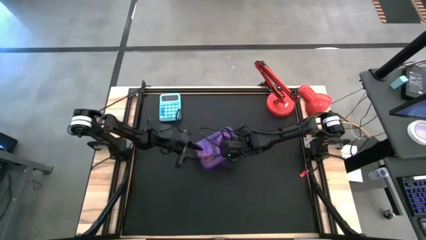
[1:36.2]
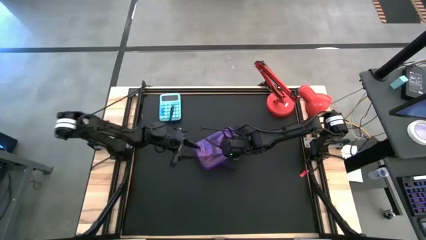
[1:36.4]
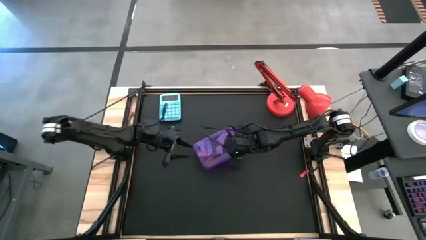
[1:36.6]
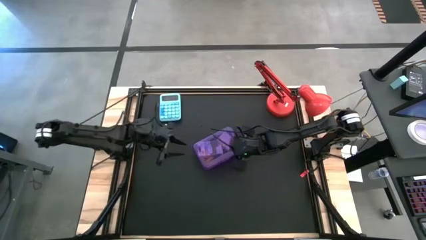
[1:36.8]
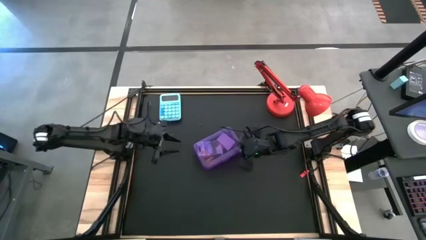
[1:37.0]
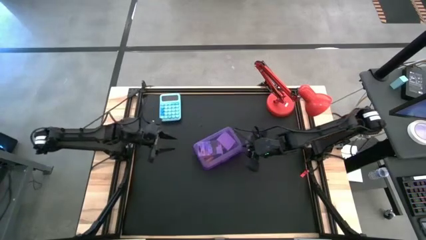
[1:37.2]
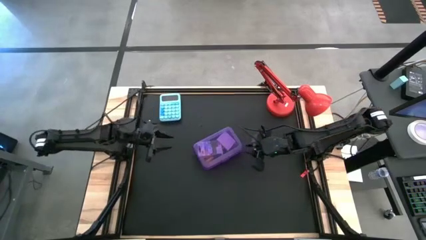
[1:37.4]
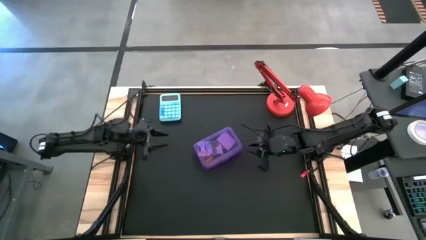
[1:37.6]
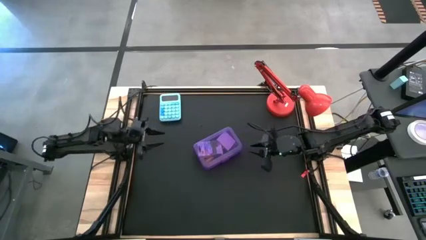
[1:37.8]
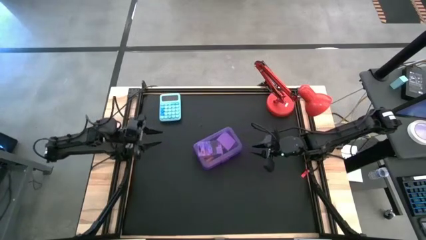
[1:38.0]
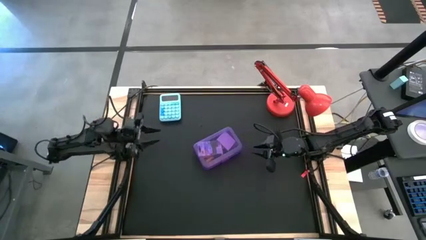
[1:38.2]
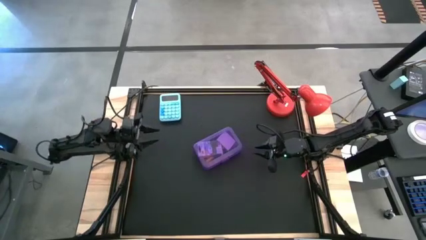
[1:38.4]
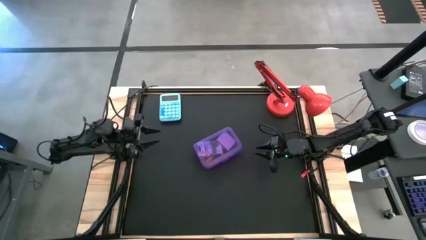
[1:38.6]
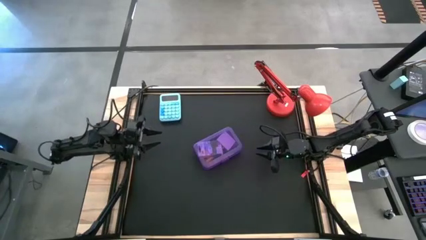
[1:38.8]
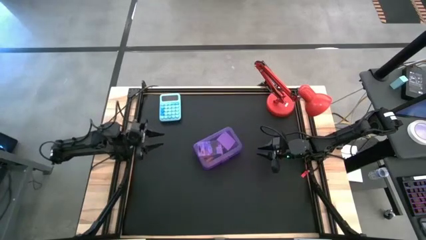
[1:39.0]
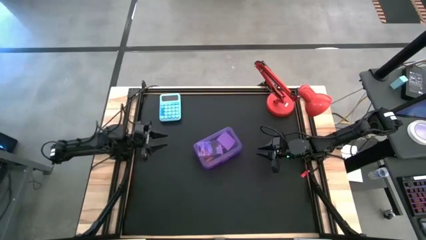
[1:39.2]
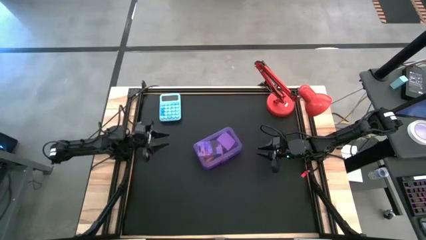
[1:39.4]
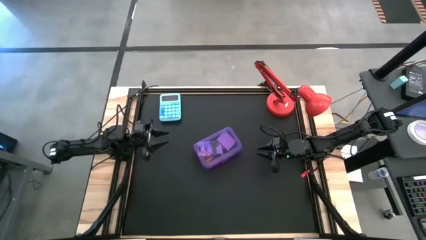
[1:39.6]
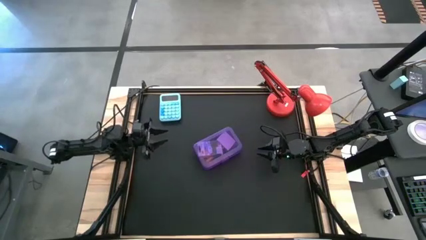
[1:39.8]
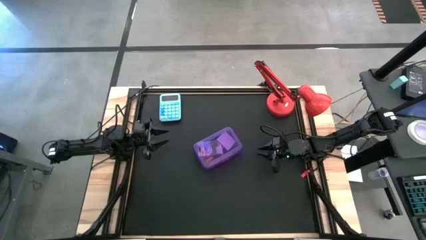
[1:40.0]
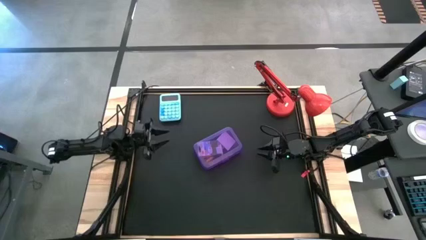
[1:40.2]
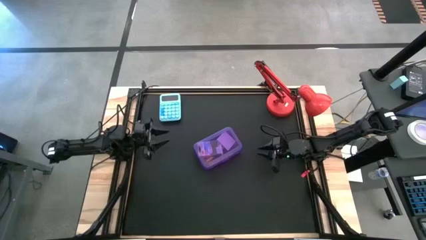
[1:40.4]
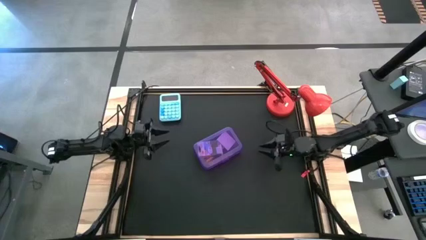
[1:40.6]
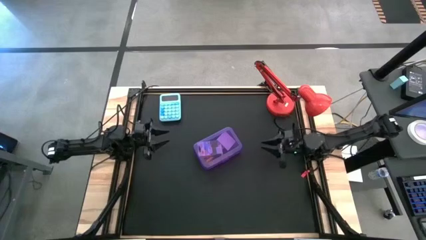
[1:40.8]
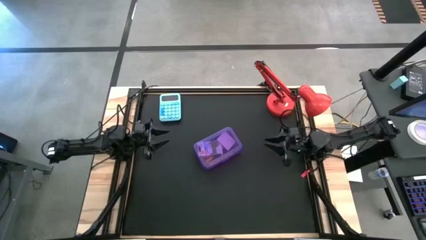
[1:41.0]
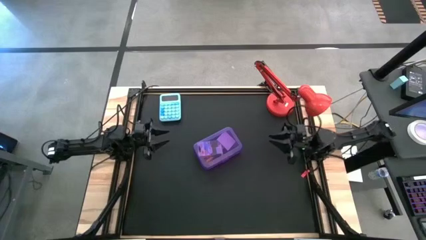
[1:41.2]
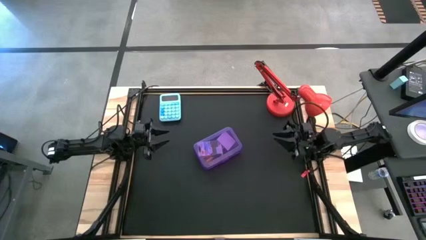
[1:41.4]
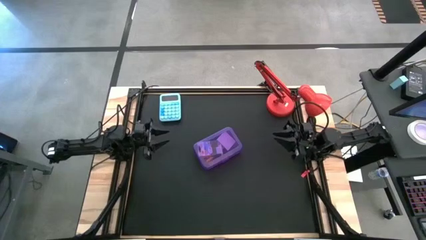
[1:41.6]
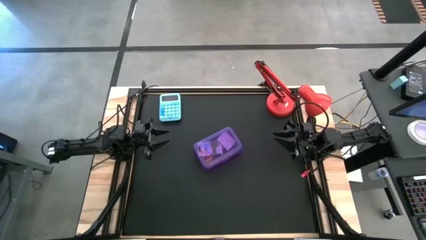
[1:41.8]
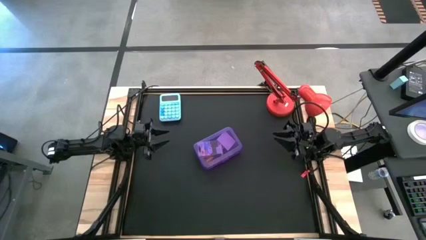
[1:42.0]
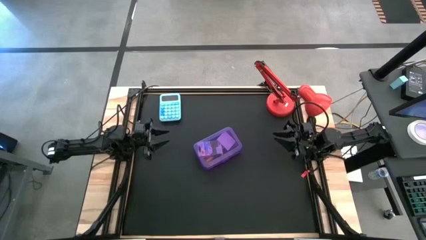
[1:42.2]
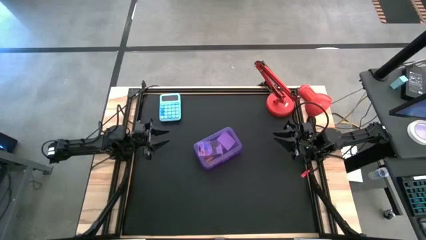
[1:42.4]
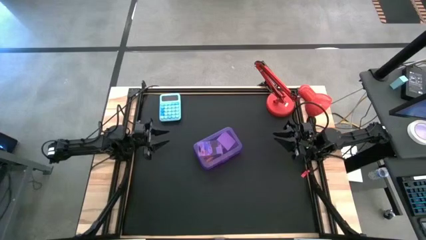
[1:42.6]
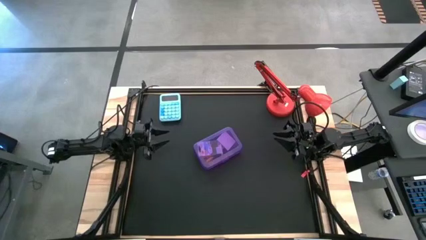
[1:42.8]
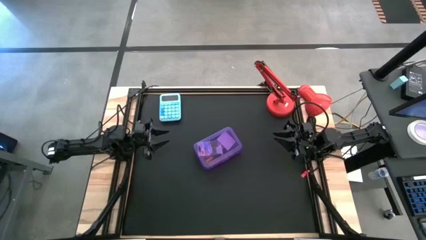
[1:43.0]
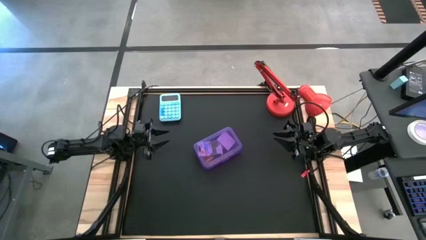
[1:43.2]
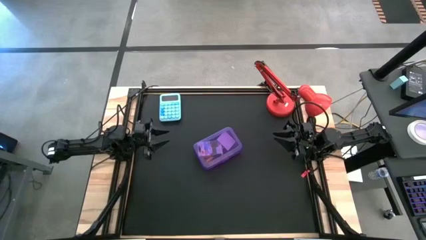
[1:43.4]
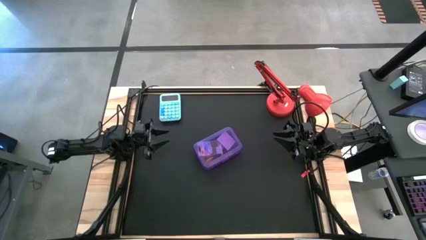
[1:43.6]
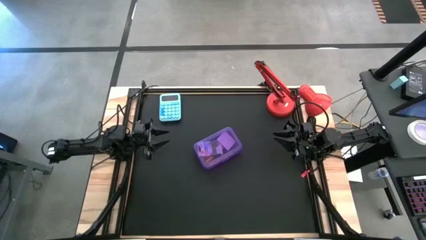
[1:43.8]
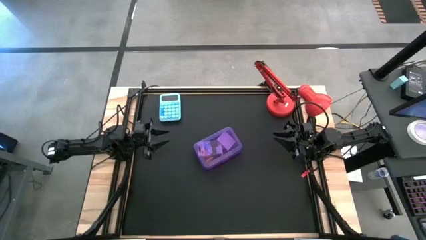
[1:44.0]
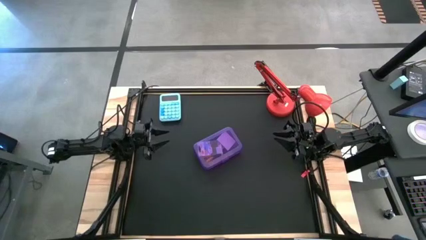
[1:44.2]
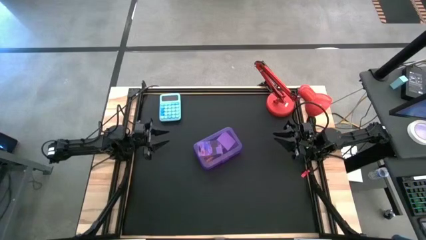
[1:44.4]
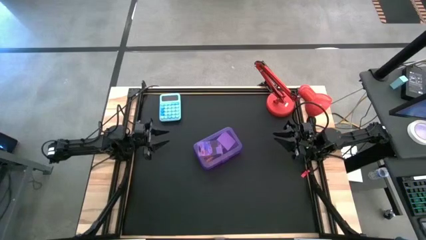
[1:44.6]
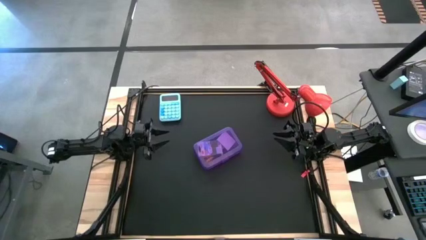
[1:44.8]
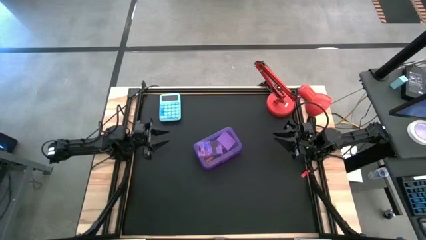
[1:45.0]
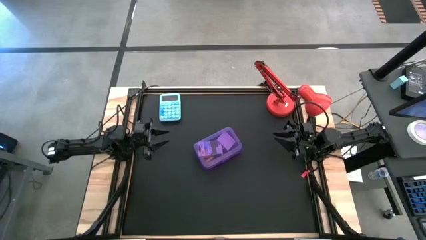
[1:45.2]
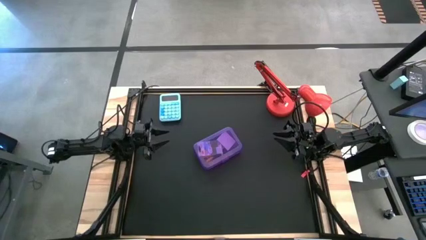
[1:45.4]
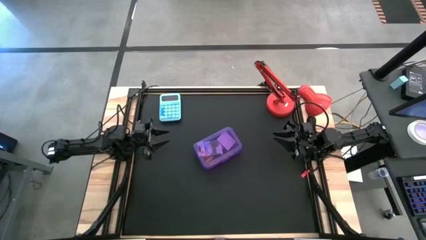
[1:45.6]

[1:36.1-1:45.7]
Task: Pack school essentials
Return to Home Position

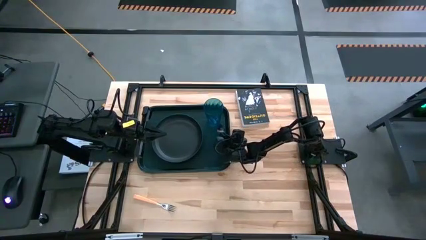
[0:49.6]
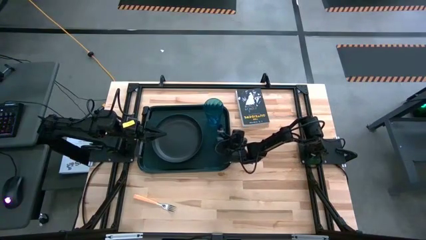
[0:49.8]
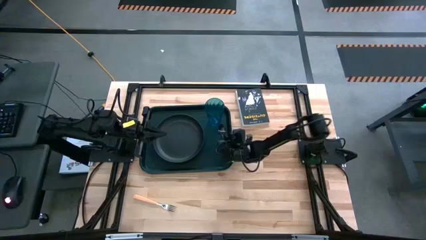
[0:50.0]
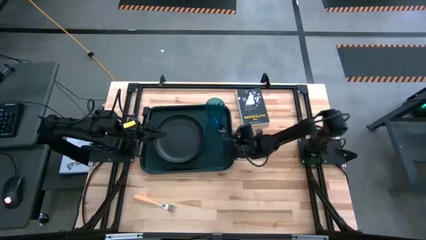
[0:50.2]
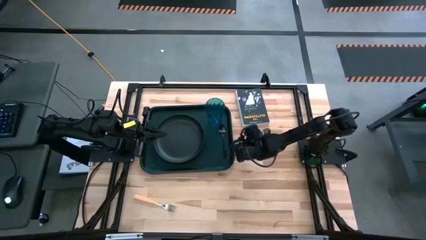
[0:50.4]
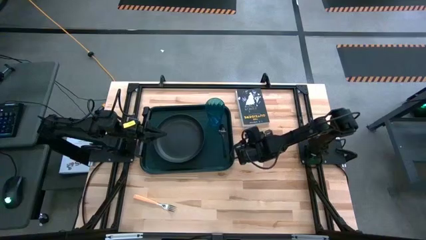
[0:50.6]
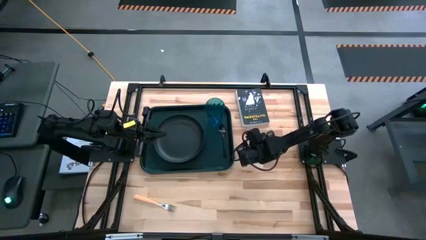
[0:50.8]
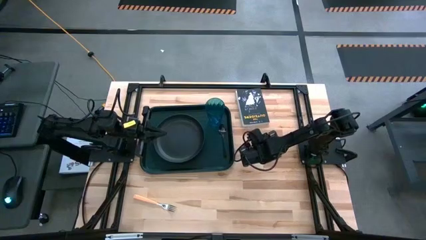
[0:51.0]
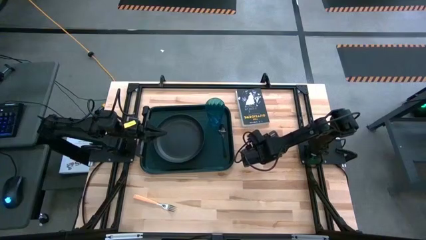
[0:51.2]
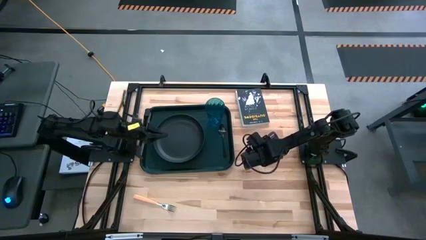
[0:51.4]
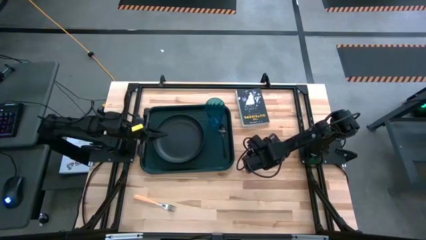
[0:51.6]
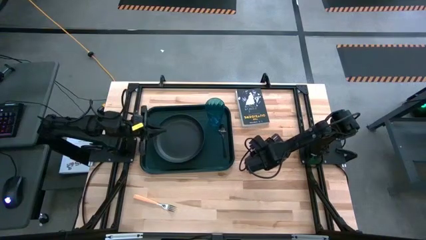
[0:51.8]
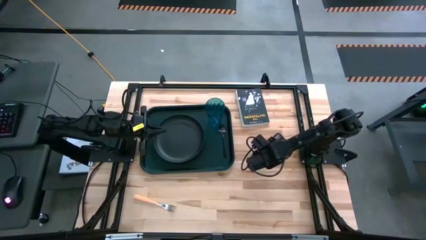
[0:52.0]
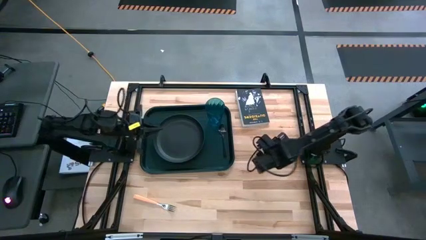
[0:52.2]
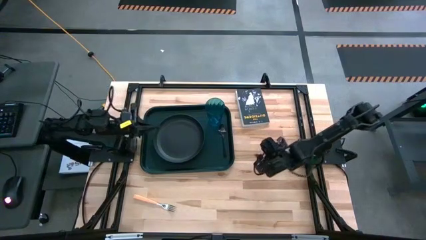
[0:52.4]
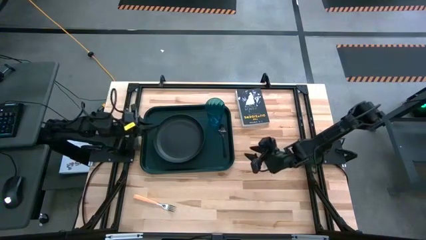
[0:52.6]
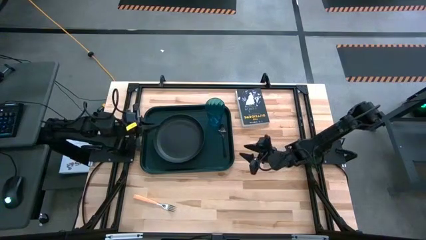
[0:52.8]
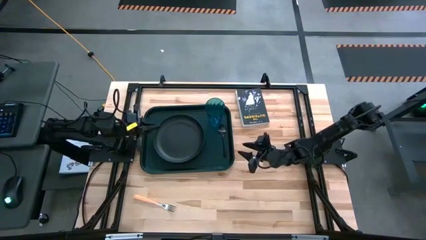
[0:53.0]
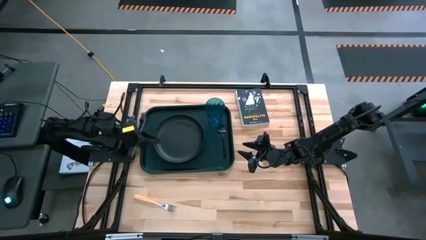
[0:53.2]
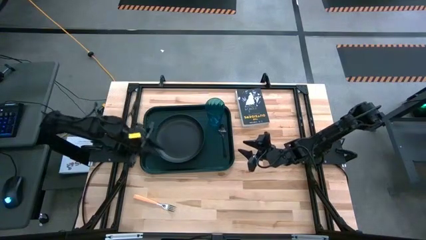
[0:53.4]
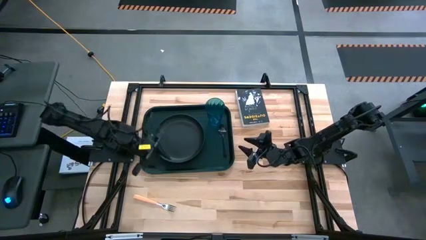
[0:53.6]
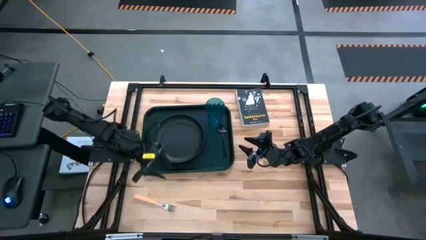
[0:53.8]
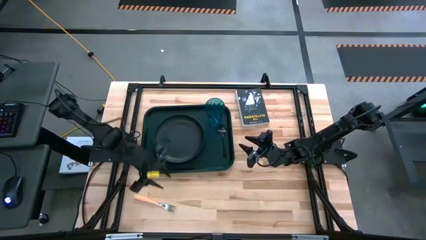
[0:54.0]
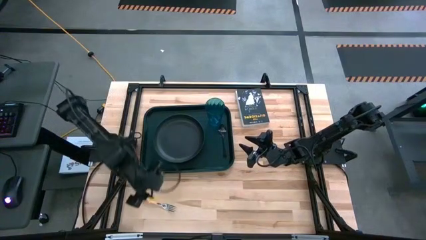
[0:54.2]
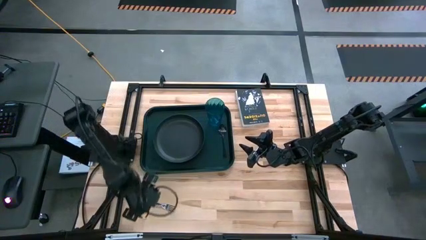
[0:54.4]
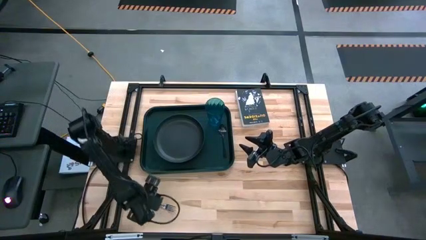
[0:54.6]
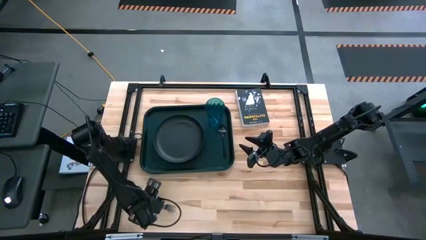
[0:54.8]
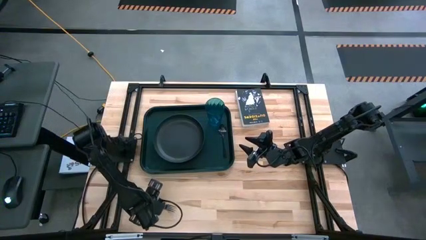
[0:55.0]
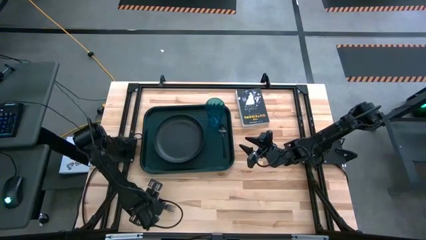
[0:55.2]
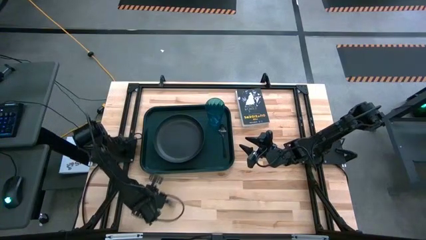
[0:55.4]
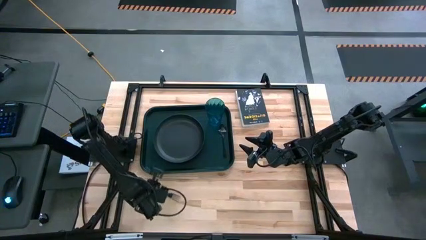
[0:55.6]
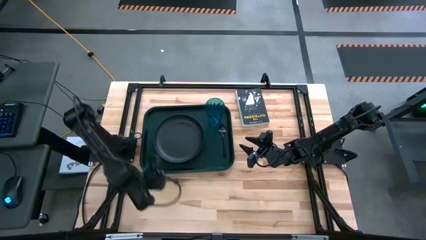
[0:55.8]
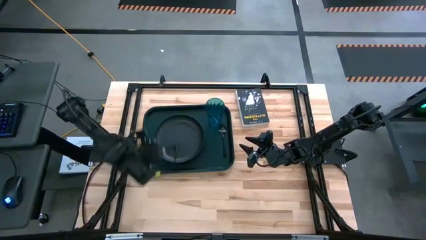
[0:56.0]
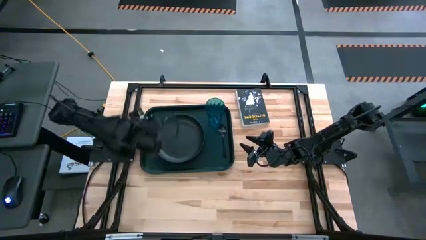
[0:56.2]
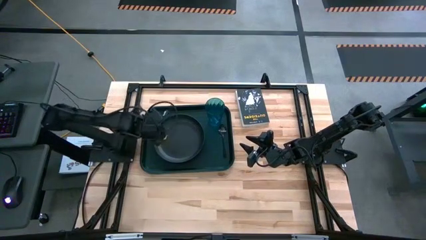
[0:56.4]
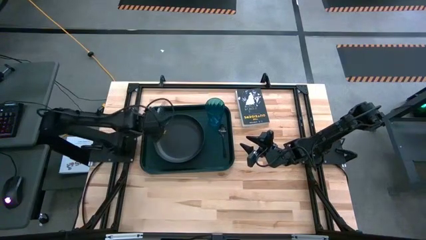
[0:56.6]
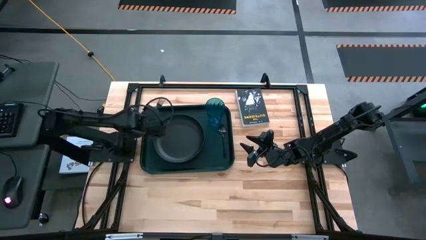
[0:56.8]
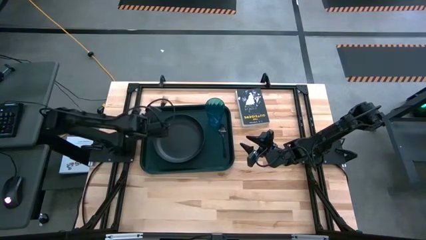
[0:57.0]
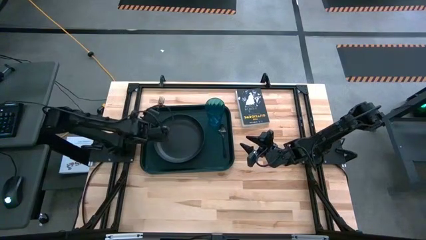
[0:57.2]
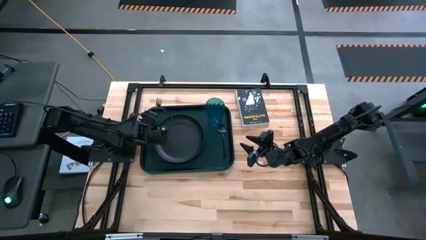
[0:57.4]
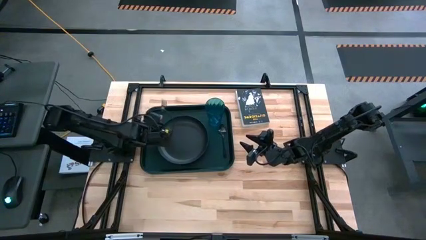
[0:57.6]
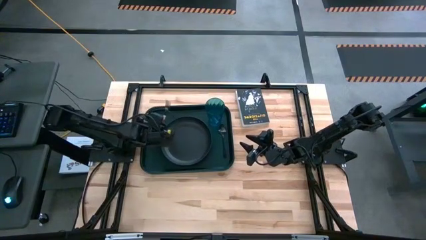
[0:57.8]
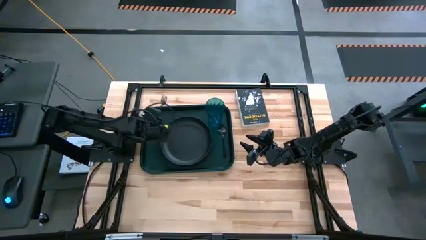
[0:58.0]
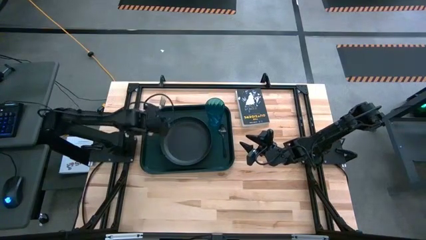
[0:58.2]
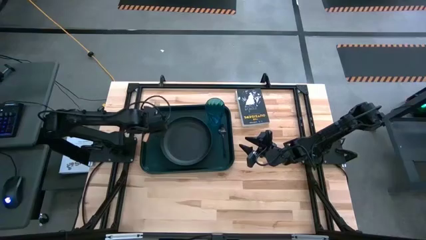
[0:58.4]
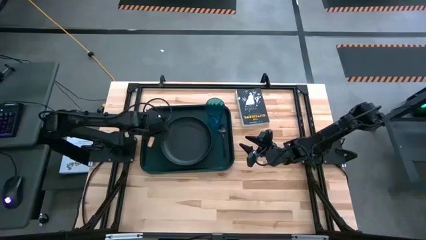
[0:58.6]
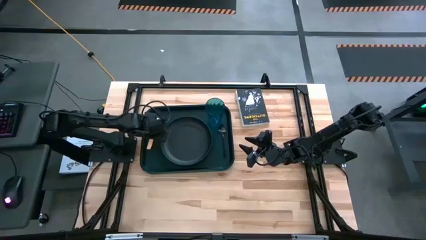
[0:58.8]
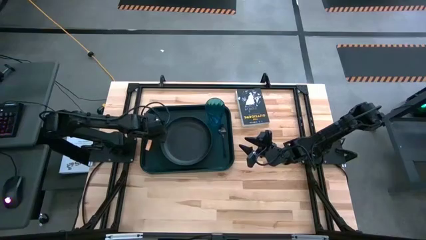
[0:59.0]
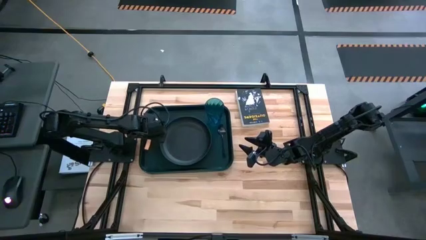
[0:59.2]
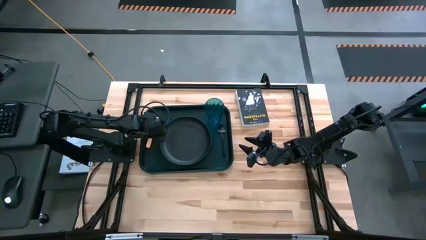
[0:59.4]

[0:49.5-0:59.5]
Task: Pick and place plate/cup/fork/spoon on tray
Put the orange fork on the left of the black tray
